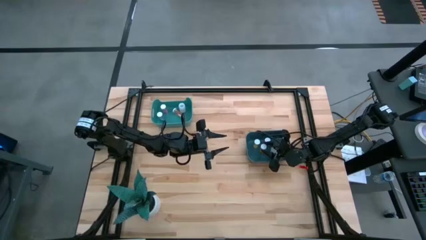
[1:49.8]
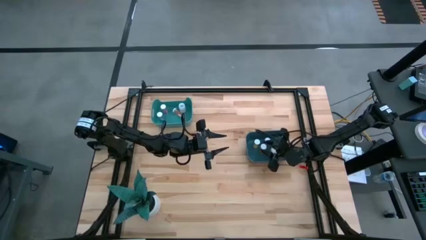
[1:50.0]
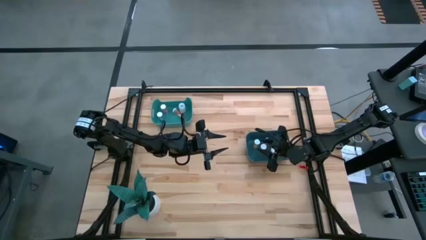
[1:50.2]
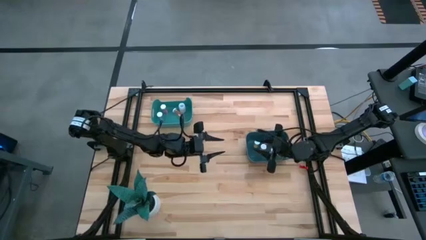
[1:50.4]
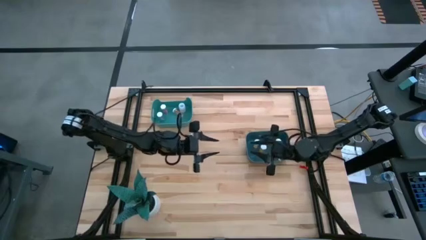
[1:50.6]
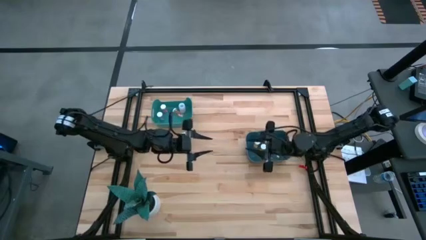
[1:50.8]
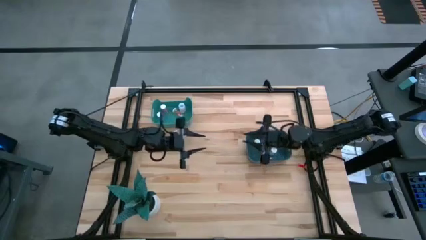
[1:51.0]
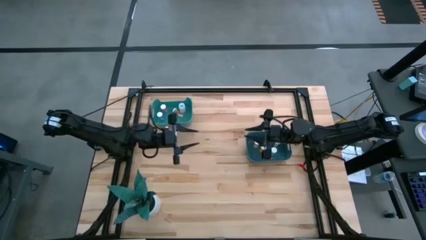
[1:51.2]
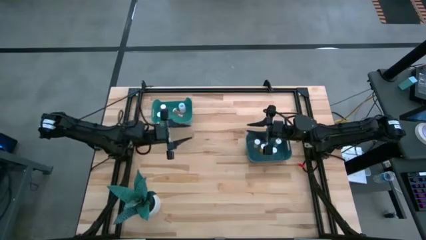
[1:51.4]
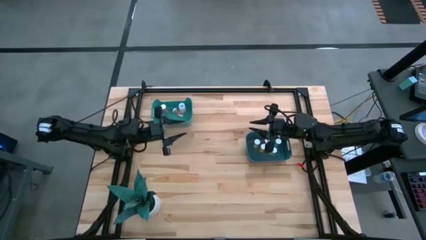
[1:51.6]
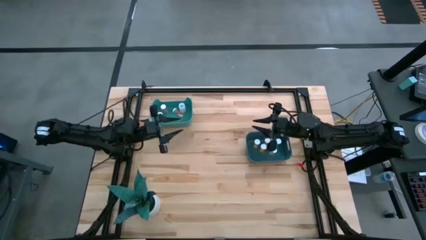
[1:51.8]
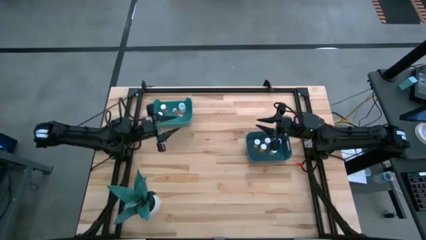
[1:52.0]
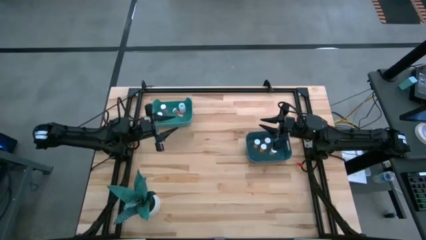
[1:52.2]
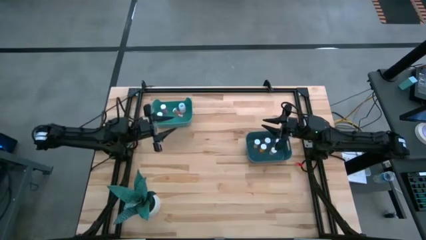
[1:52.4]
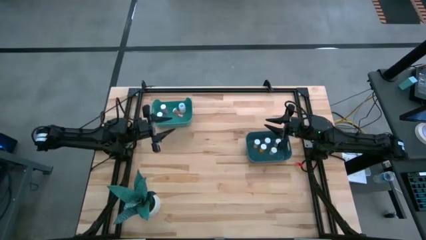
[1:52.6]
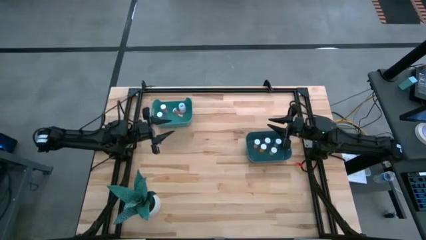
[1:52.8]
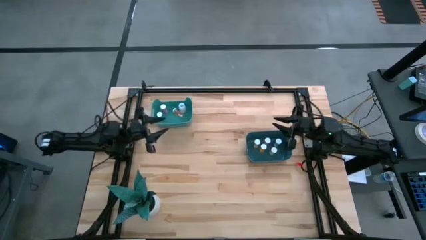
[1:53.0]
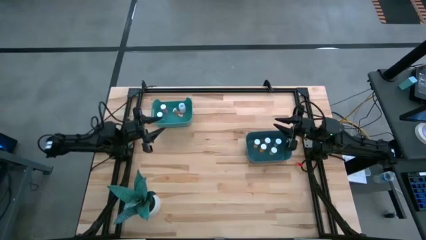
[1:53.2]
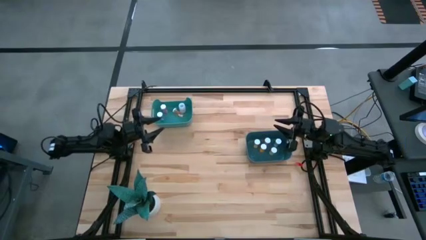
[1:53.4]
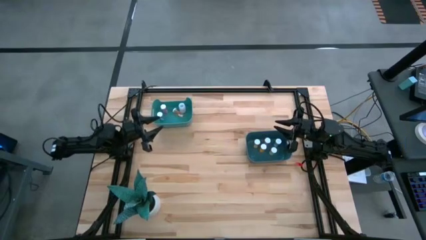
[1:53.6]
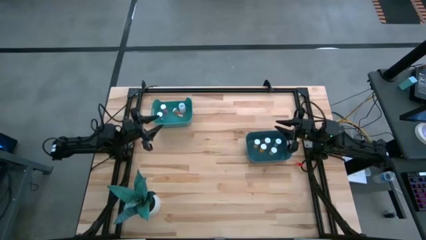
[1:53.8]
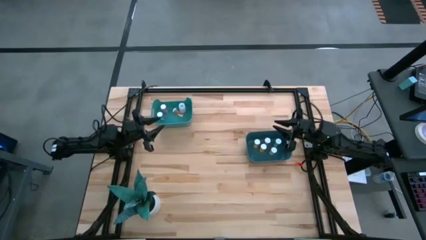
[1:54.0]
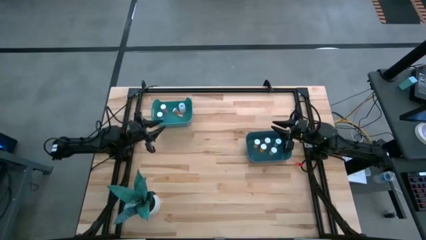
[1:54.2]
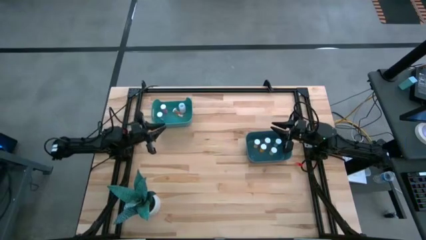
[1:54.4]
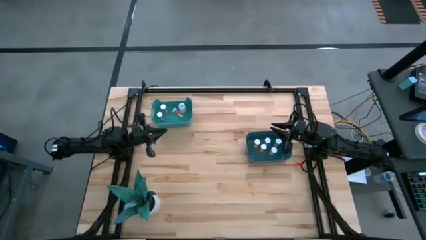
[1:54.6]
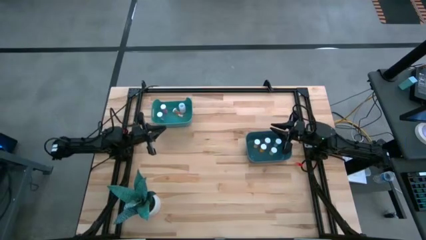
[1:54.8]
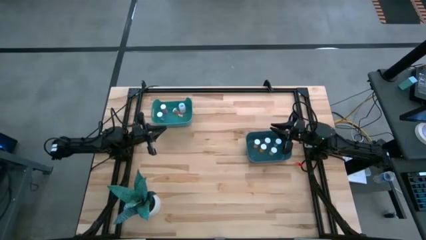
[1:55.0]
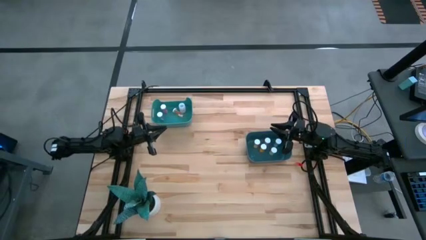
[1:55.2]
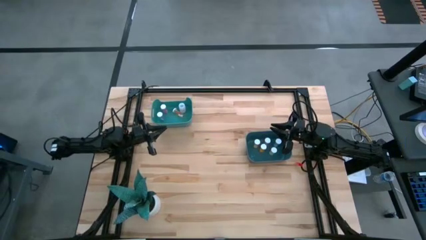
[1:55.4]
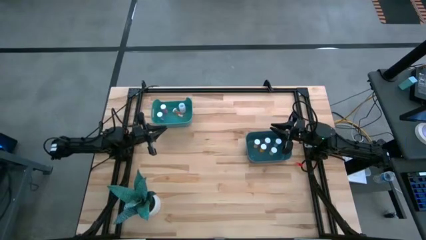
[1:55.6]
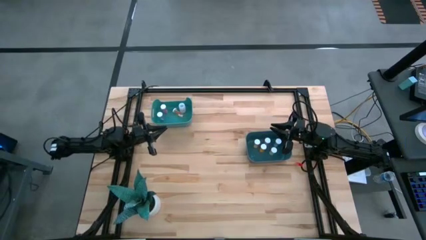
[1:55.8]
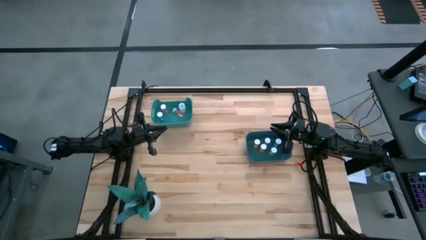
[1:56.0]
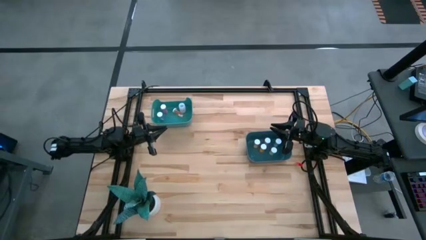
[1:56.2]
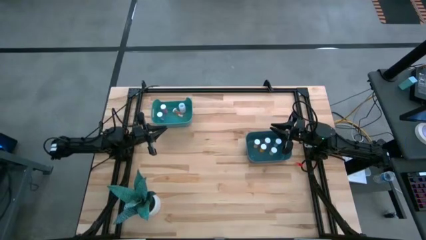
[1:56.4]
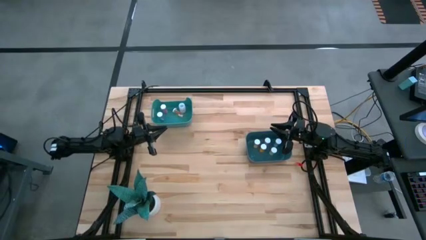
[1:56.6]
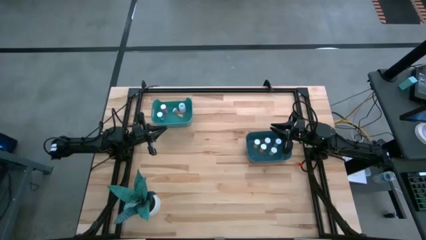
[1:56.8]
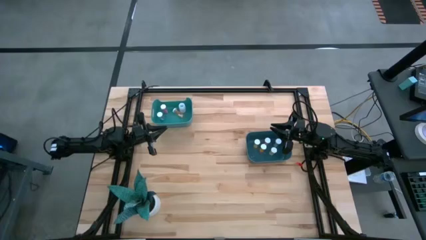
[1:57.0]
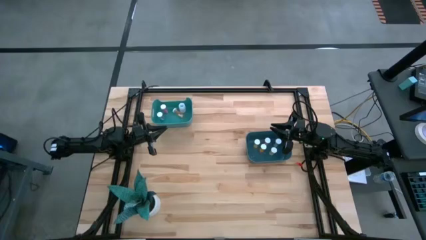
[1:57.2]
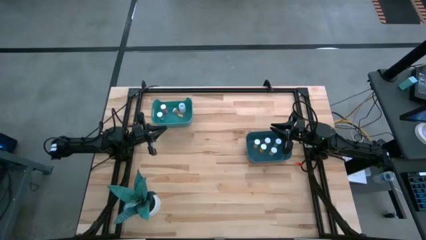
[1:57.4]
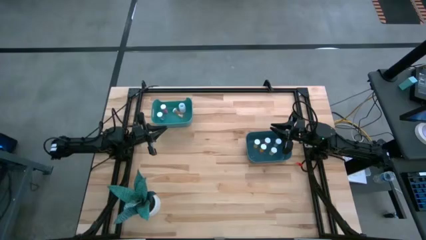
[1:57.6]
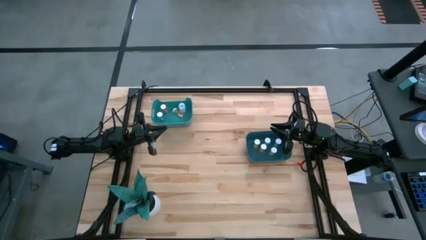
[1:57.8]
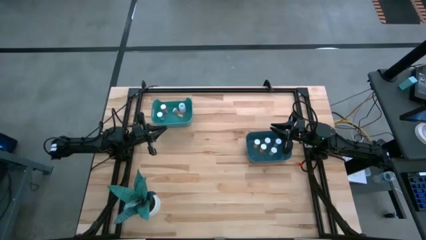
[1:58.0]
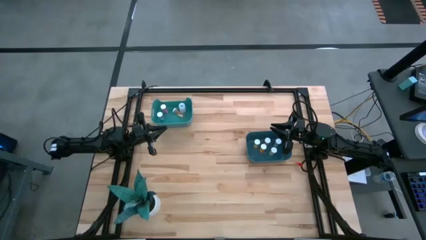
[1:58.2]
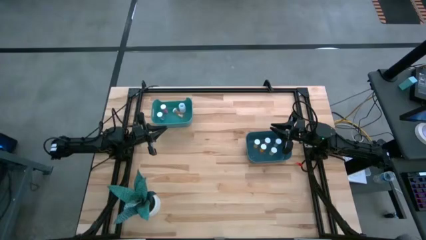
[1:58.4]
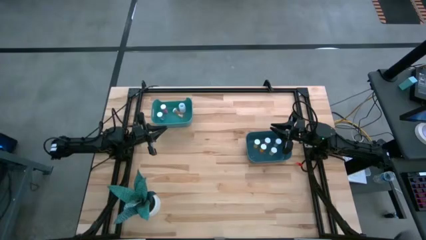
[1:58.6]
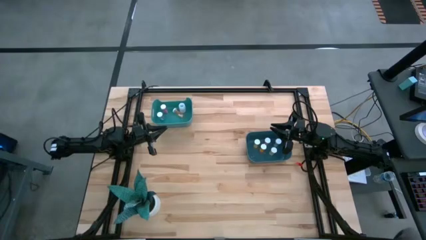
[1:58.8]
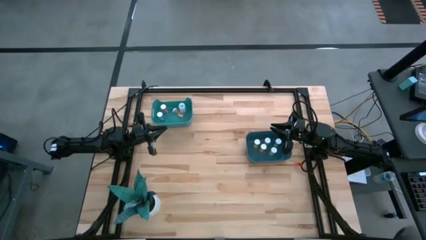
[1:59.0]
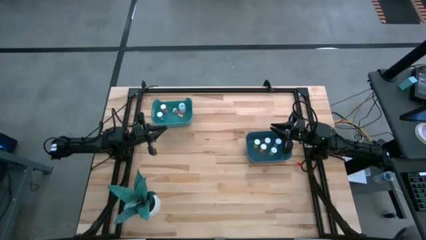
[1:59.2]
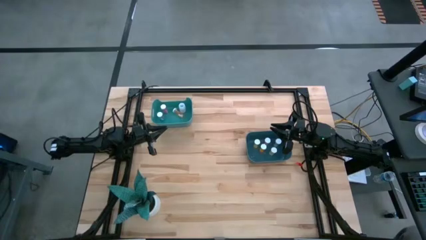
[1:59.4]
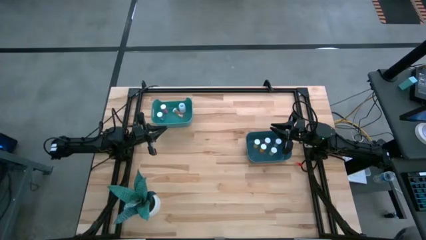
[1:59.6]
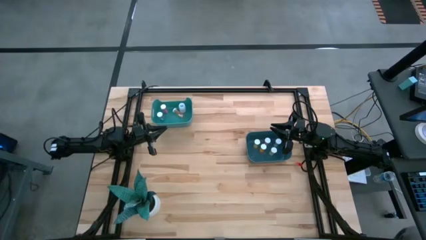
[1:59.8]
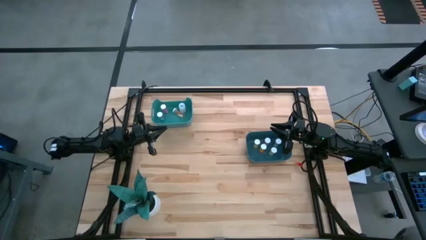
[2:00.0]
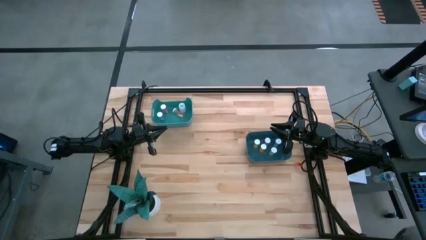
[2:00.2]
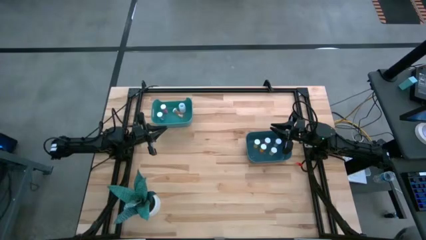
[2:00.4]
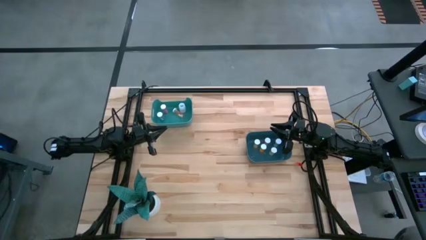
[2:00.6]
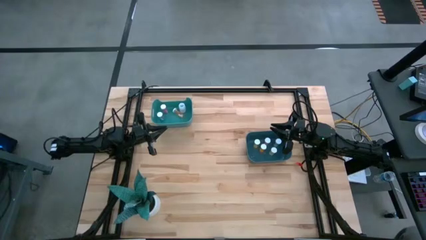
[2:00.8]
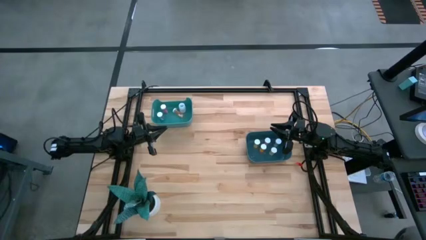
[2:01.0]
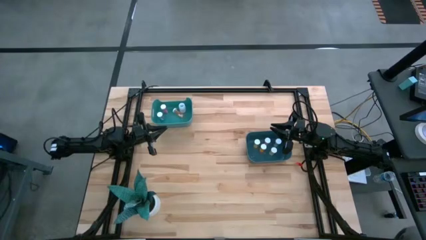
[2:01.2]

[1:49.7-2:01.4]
Task: Pick and place medicine bottles into bin by pill shape (circle, oval)
Return to Home Position

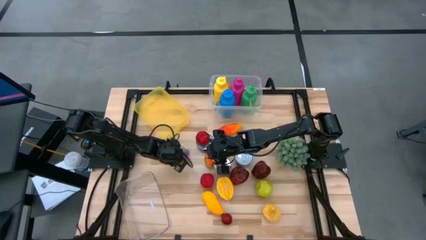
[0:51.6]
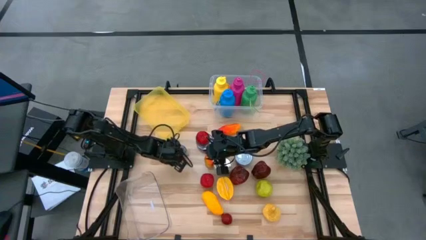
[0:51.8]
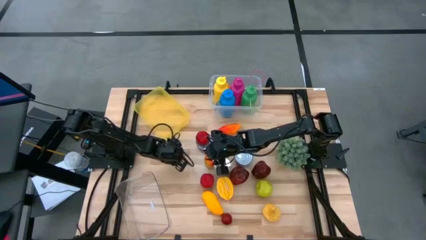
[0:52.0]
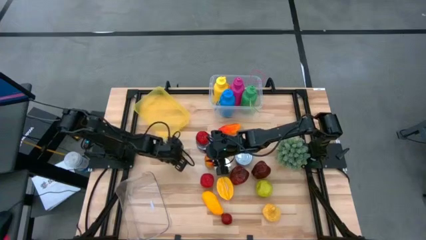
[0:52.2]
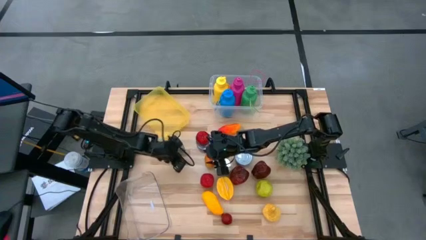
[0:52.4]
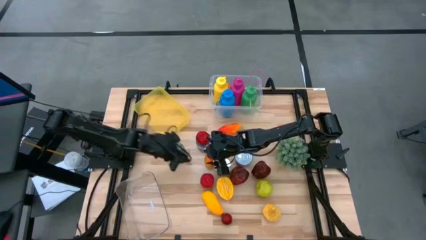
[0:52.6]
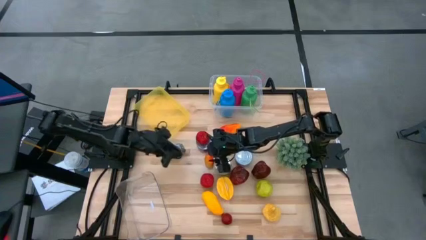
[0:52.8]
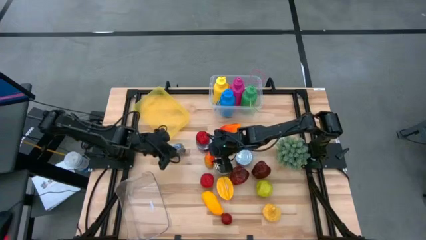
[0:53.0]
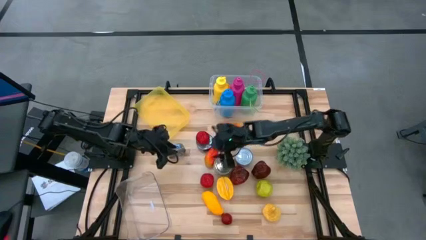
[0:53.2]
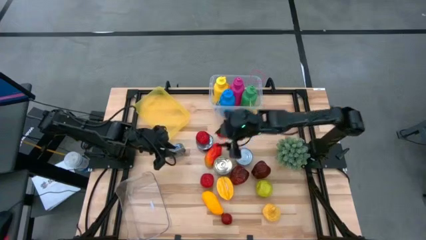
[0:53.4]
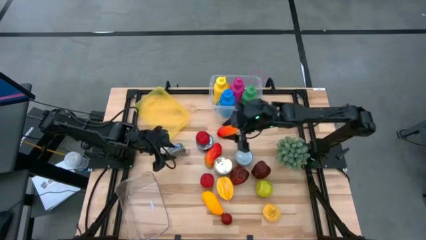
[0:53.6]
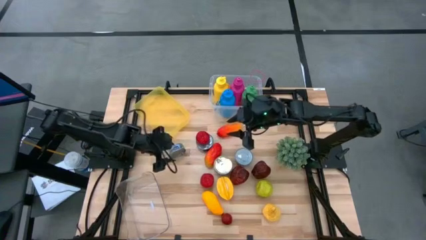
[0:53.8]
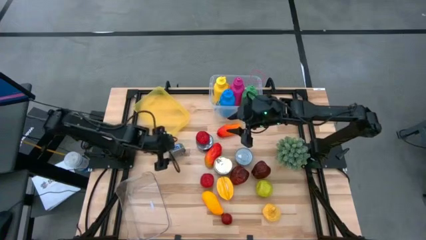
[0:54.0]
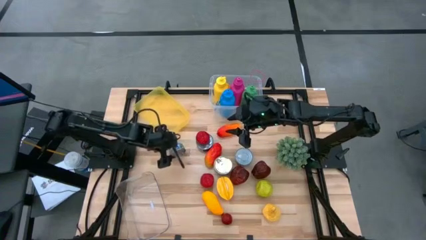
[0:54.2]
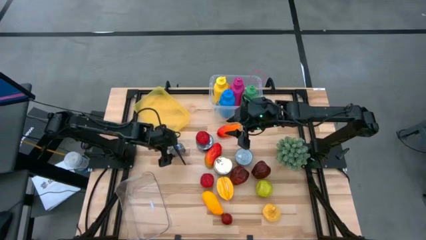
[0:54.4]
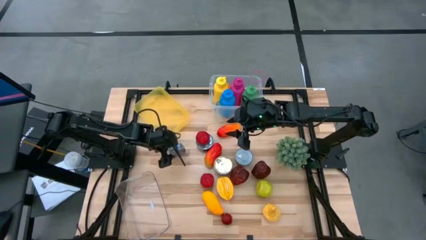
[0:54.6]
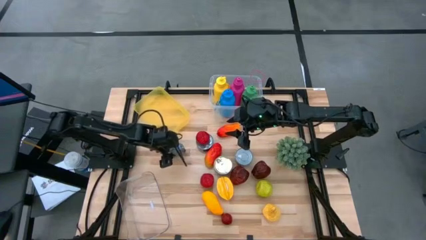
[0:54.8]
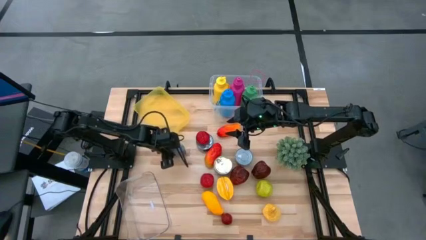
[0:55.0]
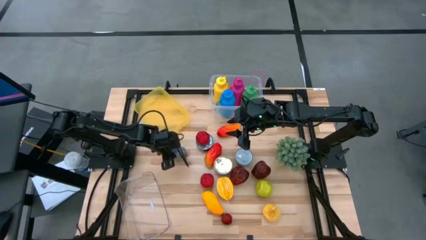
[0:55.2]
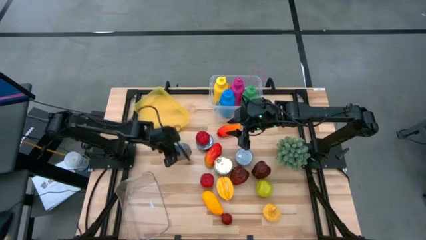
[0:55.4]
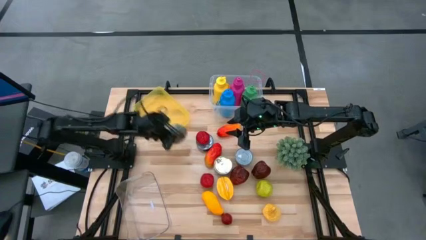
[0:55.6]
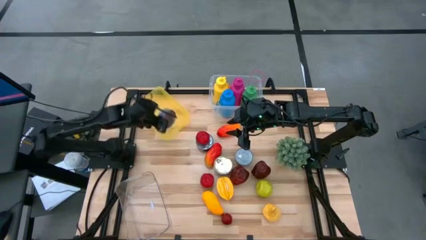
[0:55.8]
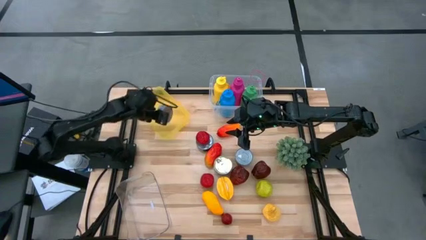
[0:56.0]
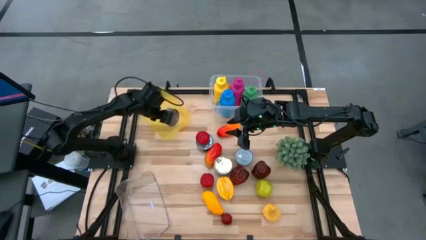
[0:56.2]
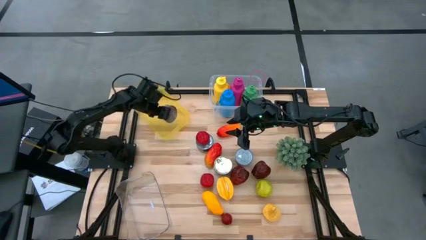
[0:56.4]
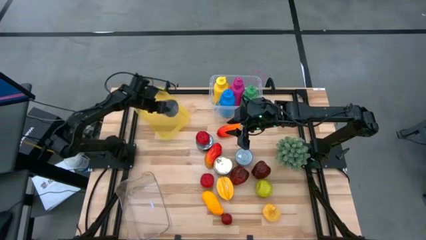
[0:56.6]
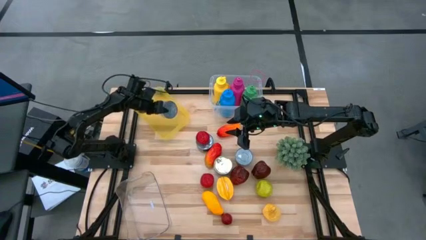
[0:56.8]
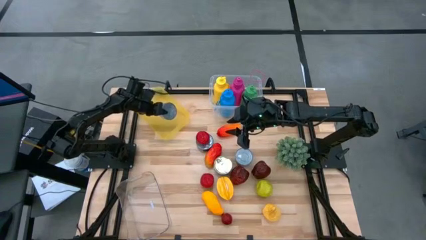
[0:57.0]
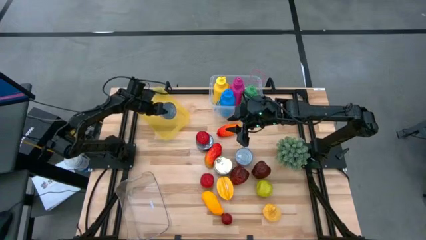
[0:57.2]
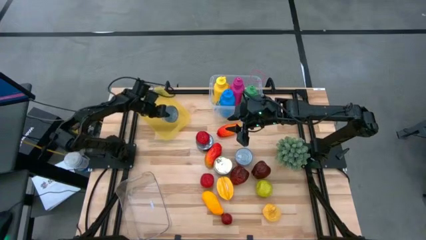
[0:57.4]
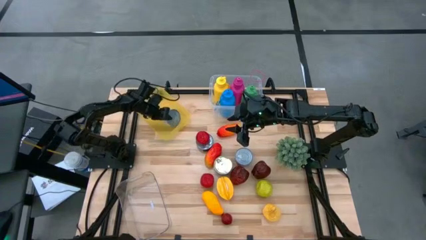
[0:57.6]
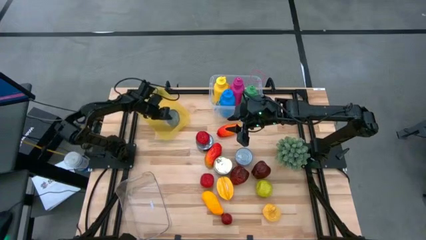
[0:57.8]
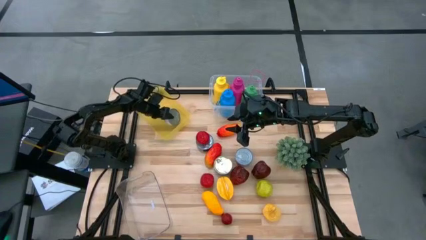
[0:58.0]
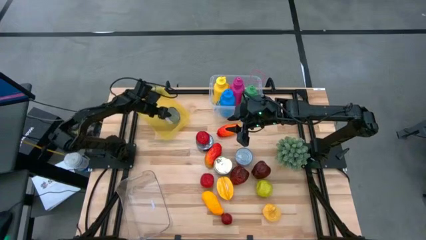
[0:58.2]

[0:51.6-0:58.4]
Task: Pick & Place Food Item
Put the green tuna can into the yellow bin
